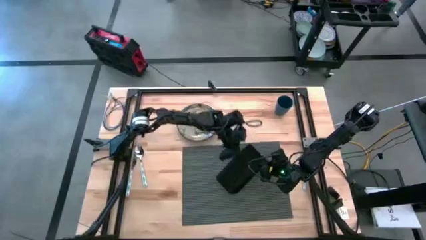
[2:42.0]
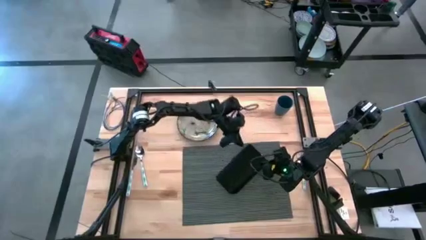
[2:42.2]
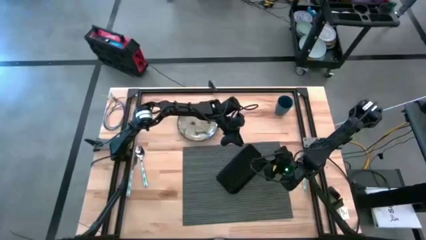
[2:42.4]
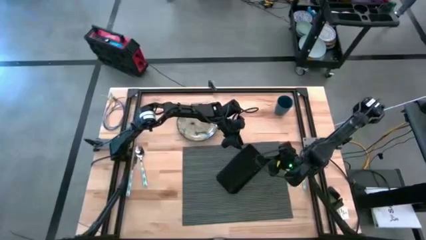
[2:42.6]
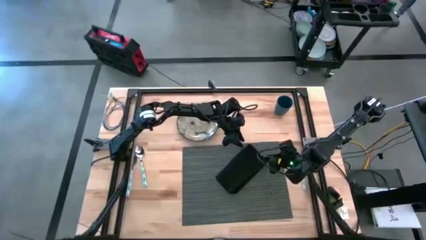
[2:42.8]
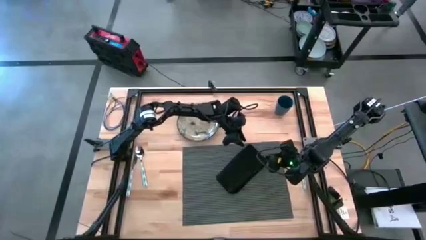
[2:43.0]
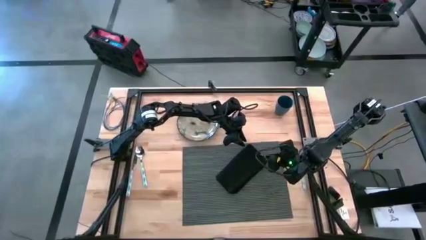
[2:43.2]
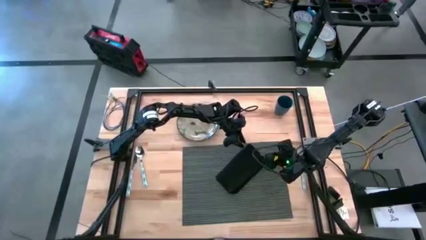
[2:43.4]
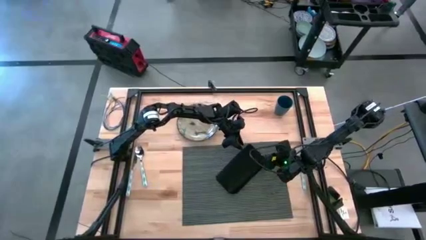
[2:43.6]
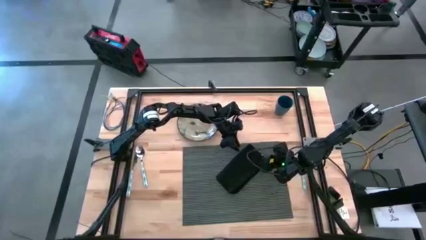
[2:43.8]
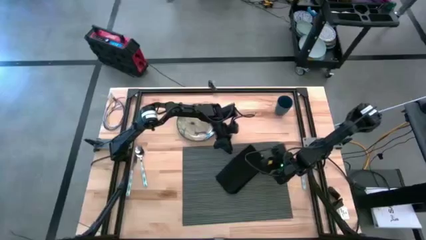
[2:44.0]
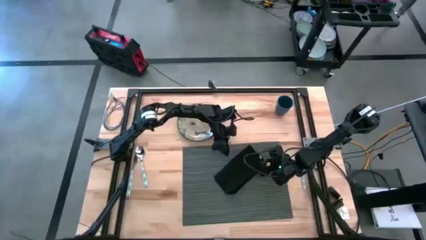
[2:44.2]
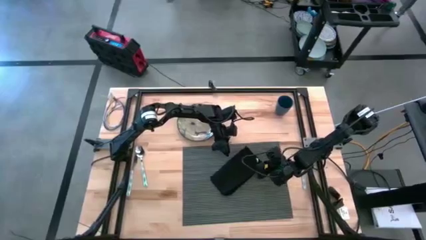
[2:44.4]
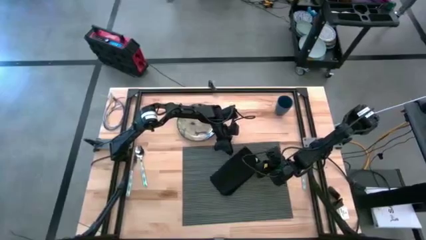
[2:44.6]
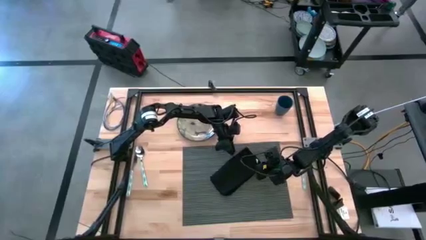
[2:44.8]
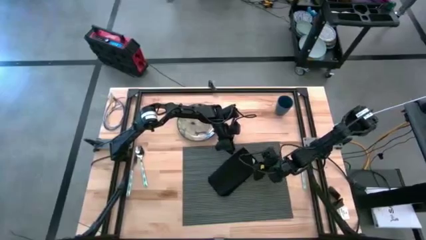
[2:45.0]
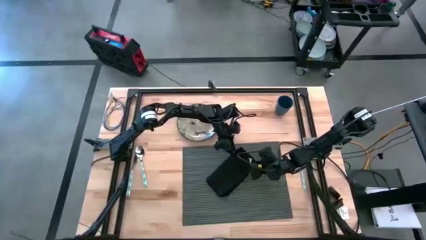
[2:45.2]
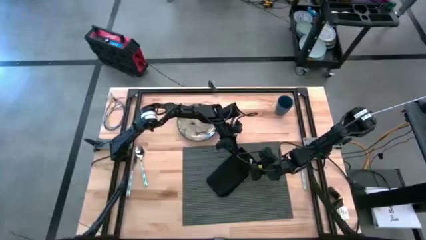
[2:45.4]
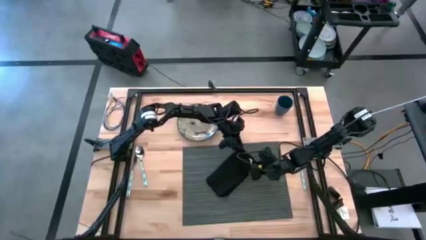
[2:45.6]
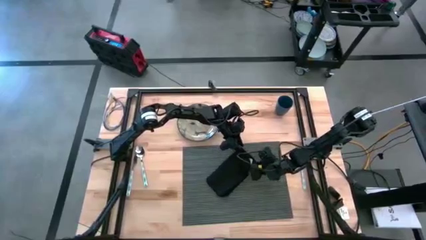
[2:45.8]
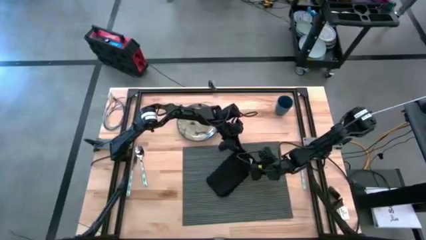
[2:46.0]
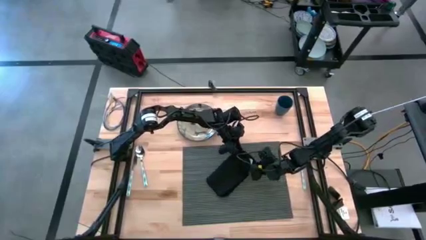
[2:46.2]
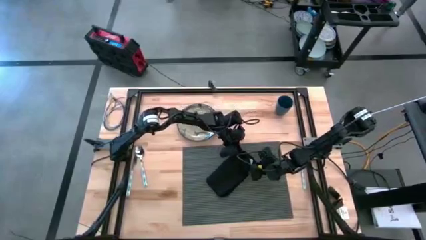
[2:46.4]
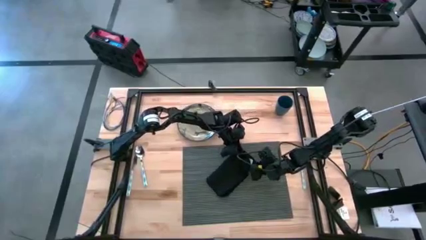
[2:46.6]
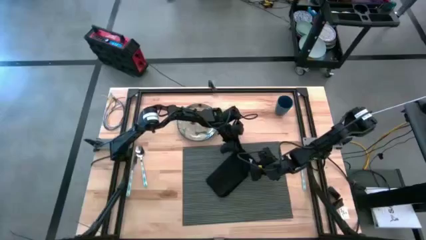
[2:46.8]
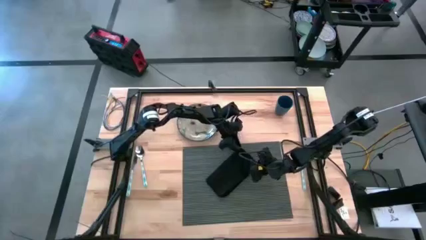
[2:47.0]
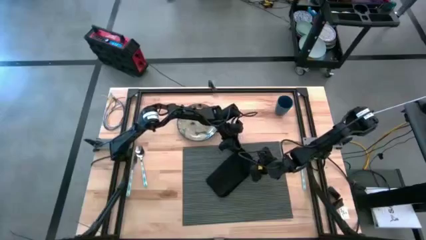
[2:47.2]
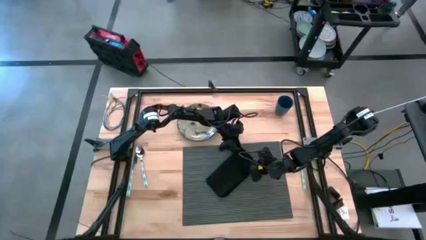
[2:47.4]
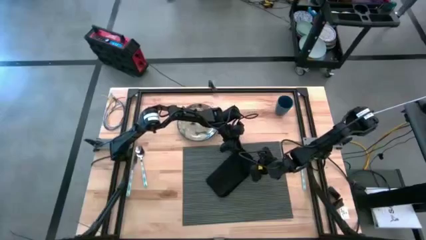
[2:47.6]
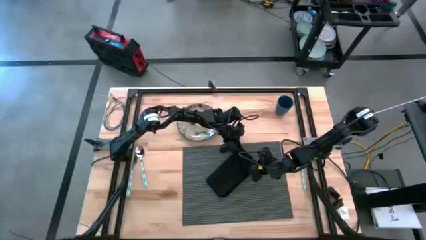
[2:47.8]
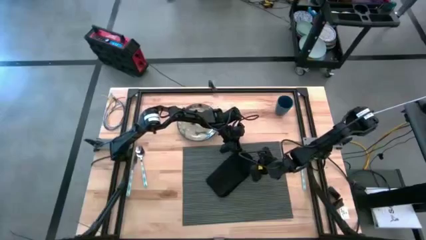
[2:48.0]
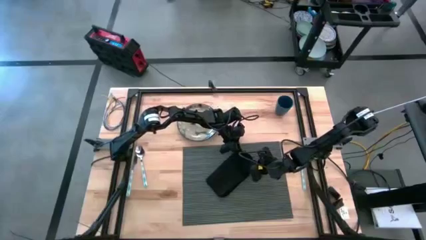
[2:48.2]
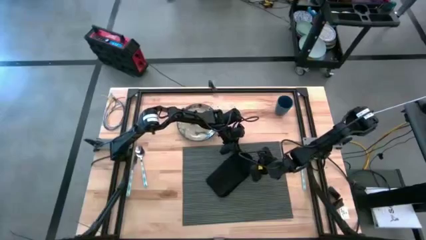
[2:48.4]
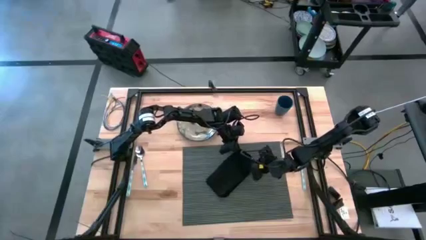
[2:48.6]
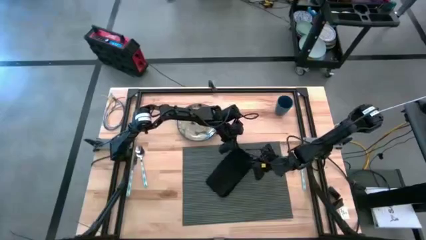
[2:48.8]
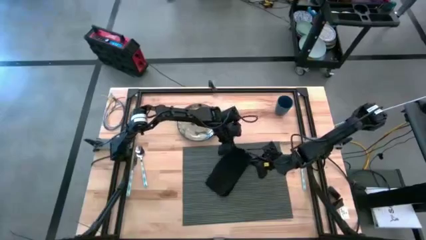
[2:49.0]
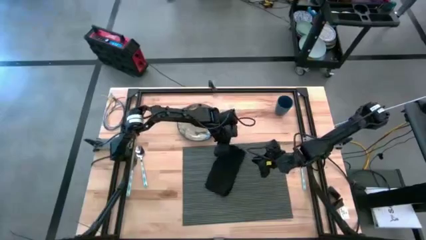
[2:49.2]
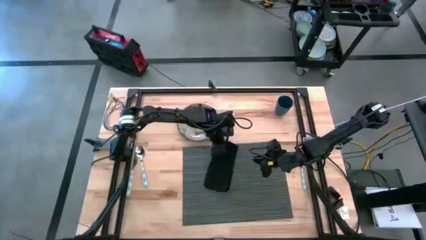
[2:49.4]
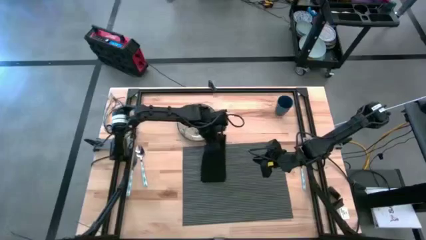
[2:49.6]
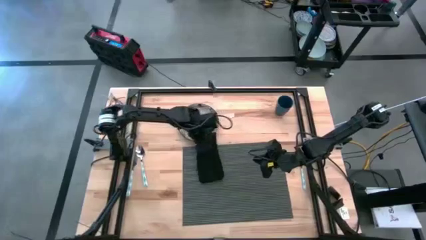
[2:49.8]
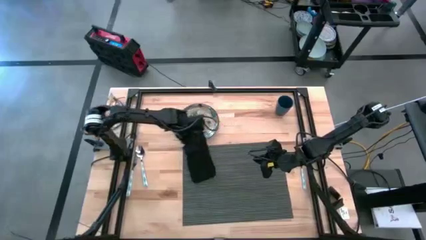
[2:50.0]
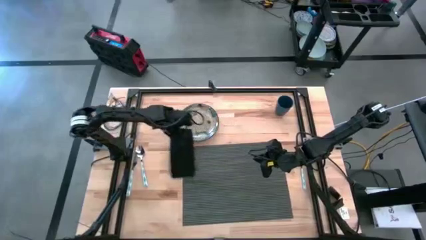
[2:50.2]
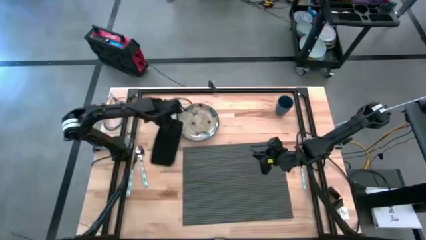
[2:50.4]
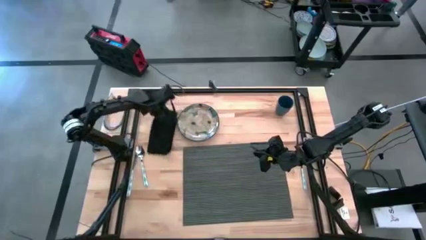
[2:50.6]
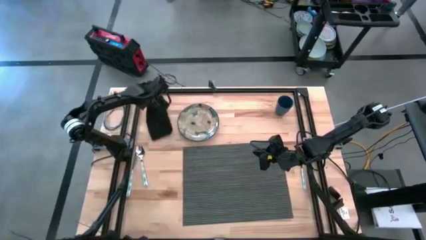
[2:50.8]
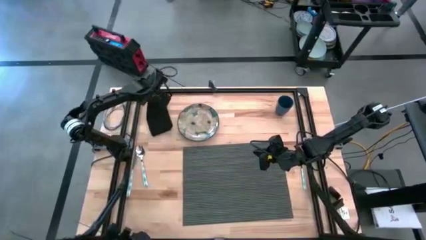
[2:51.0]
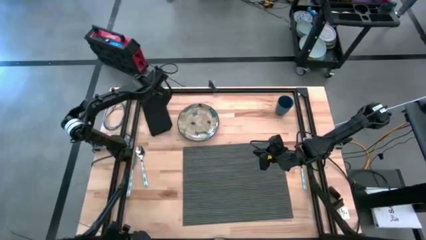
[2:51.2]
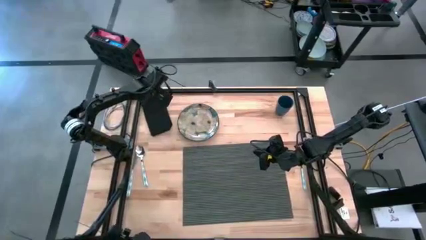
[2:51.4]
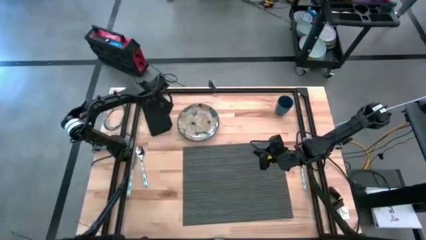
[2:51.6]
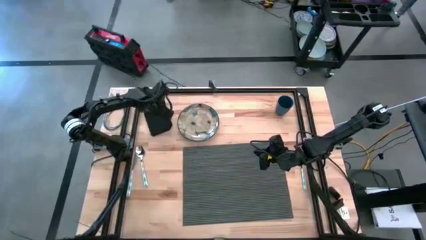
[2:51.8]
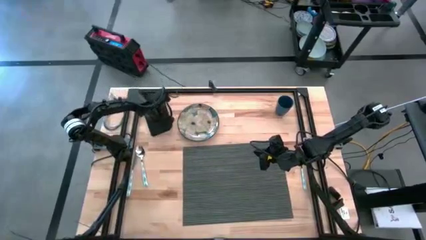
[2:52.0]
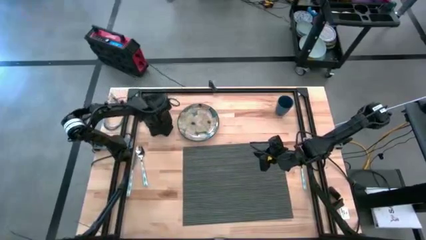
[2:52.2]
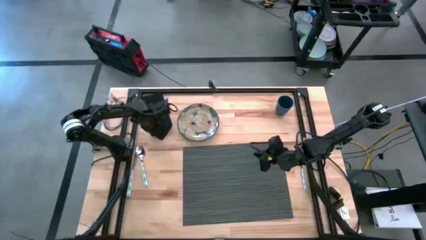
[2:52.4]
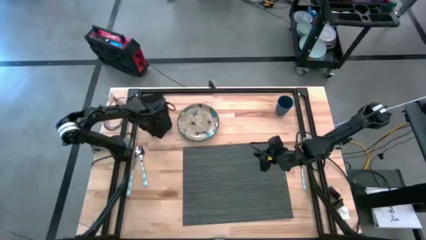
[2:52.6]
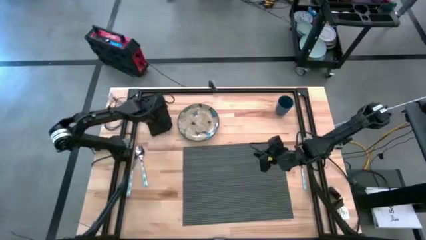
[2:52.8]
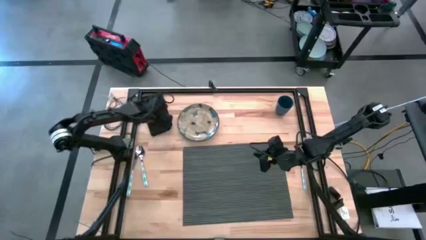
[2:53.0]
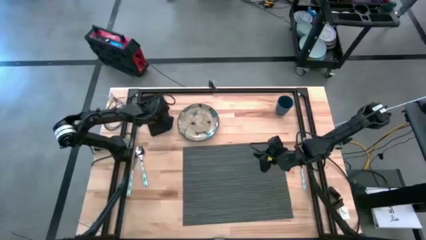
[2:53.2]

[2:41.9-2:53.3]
Task: Set table place
Move the folded black napkin to the top left of the table

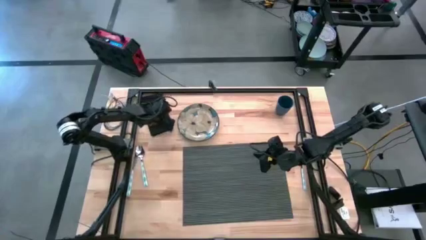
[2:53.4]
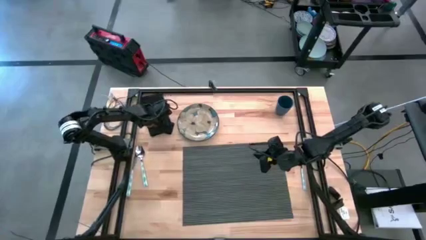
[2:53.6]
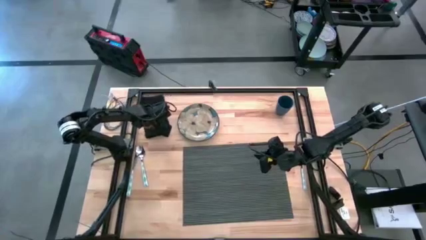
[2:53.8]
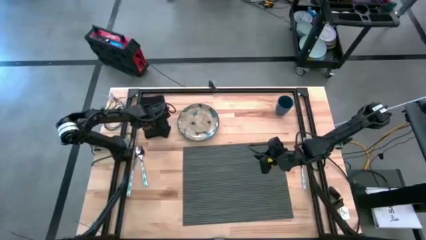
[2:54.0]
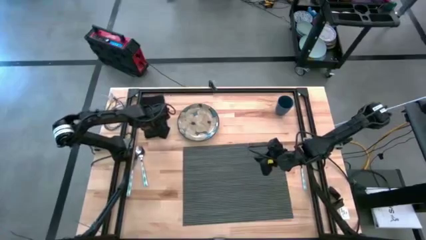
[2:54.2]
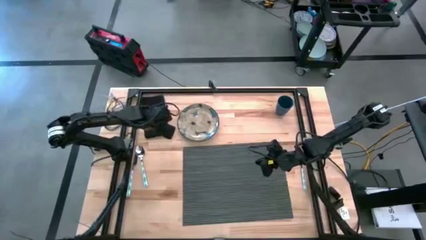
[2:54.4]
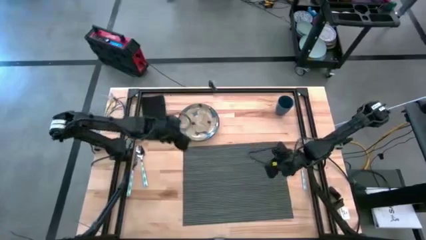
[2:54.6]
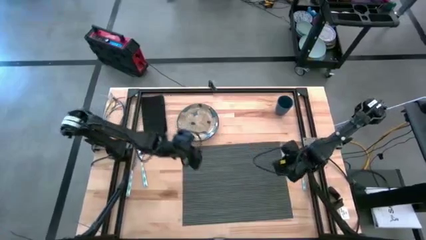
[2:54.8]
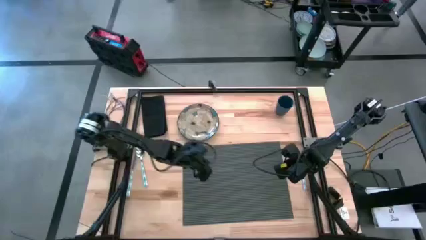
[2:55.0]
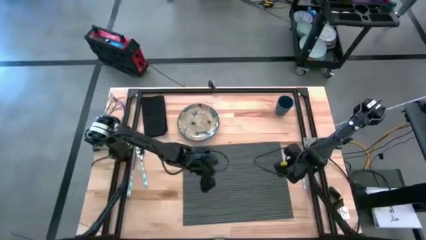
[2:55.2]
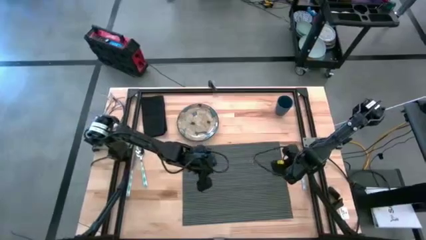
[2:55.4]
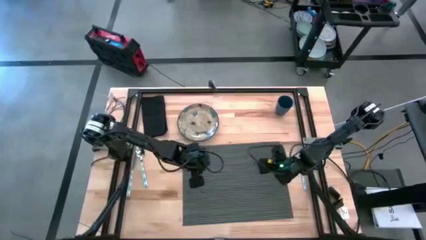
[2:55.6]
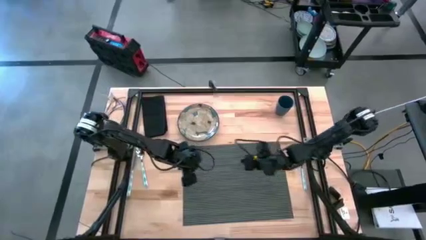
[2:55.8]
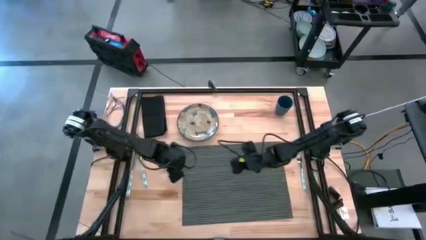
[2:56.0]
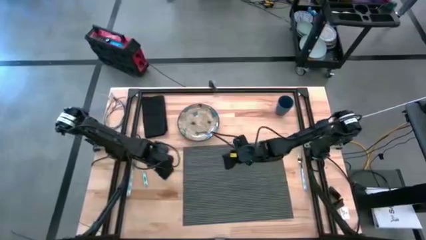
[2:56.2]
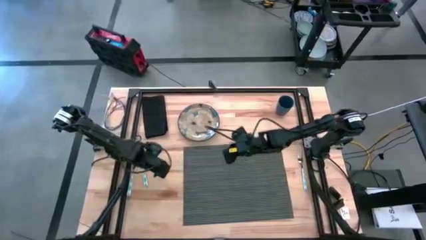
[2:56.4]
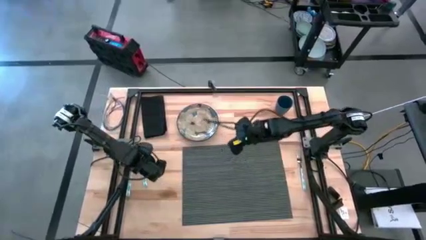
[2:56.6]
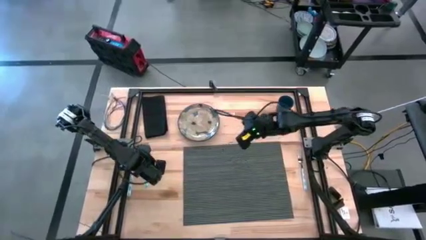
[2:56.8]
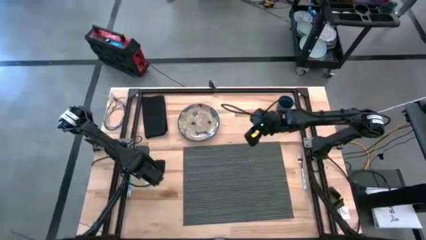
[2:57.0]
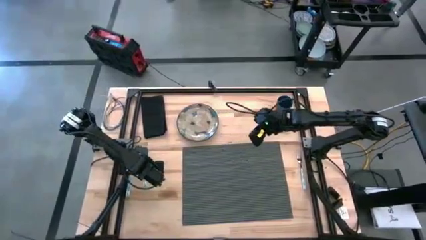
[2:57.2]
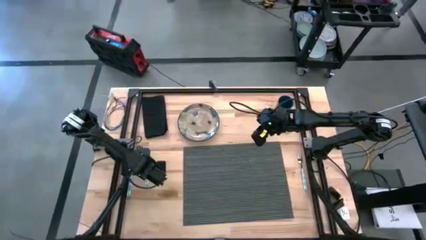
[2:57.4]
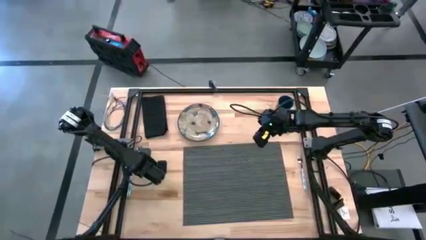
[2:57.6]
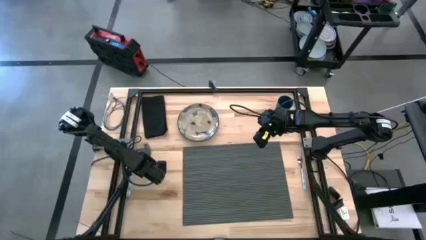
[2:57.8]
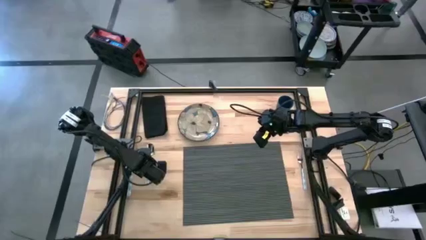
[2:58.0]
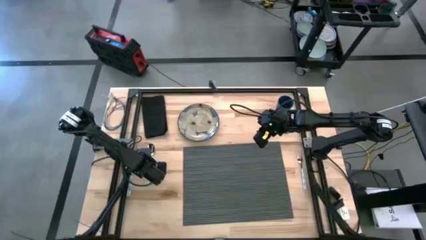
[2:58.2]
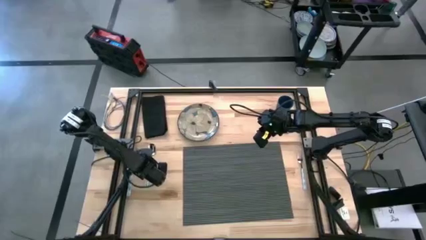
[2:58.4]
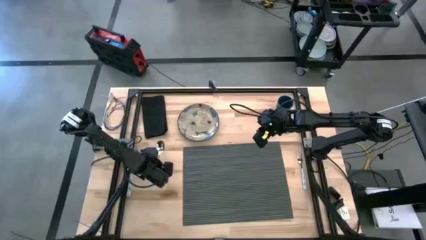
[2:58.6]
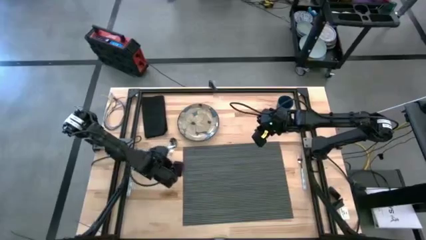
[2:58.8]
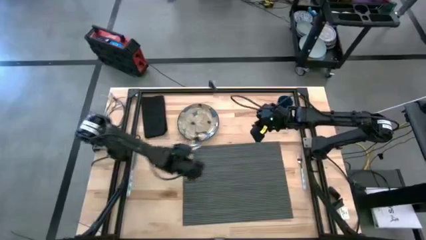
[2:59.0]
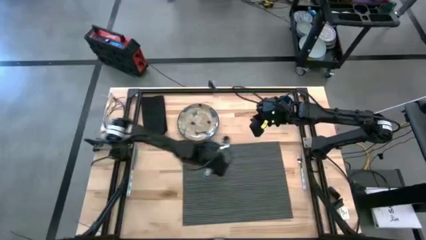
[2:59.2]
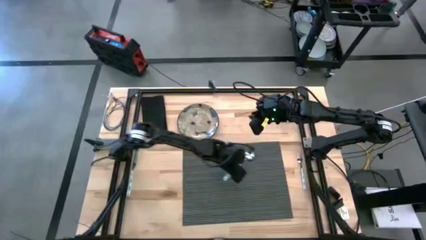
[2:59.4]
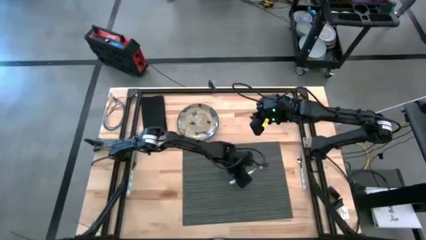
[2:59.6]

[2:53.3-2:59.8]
Put the blue spoon on the gray mat
